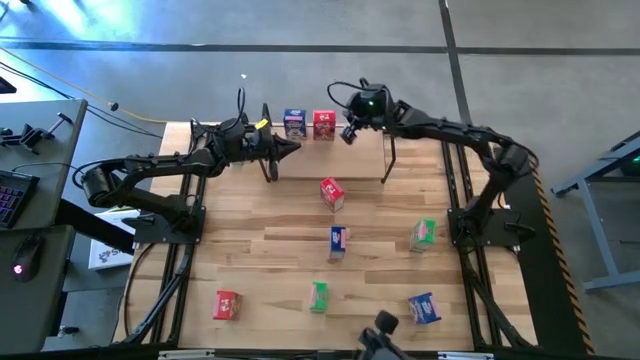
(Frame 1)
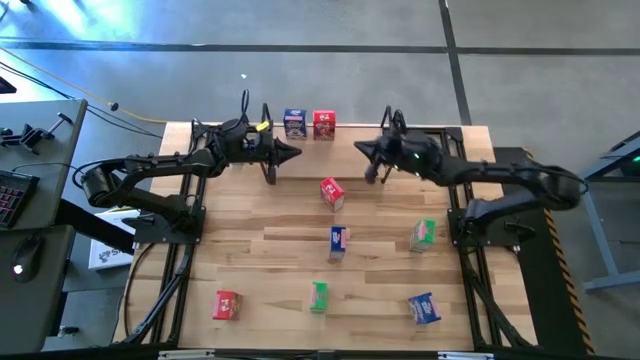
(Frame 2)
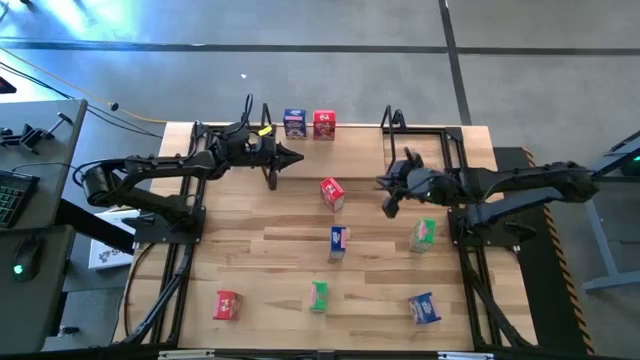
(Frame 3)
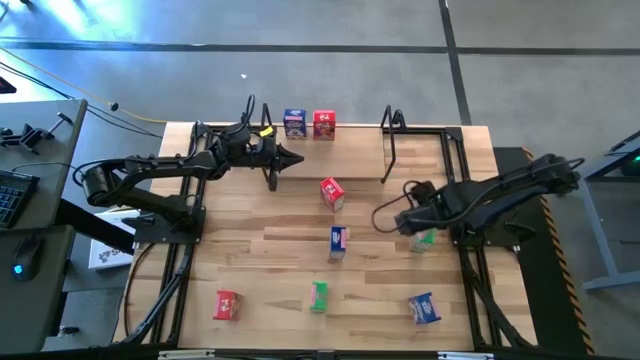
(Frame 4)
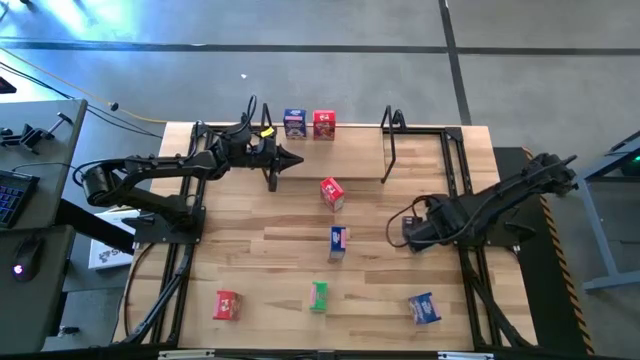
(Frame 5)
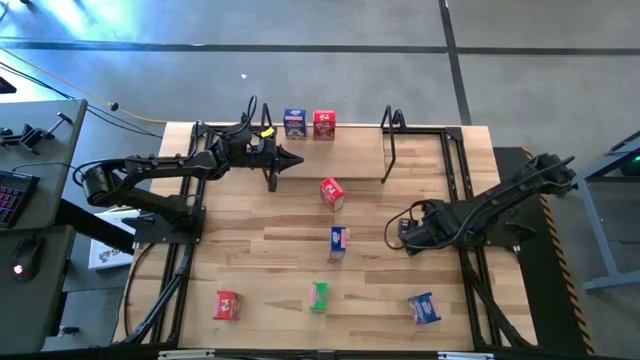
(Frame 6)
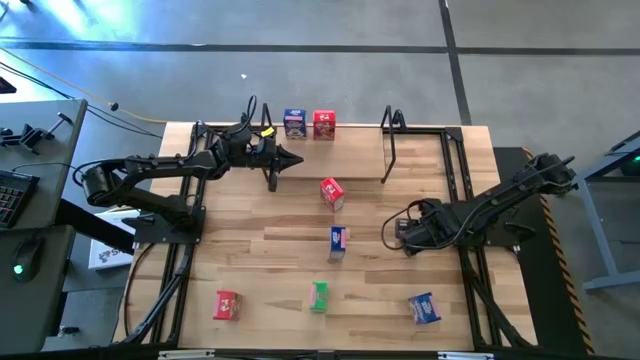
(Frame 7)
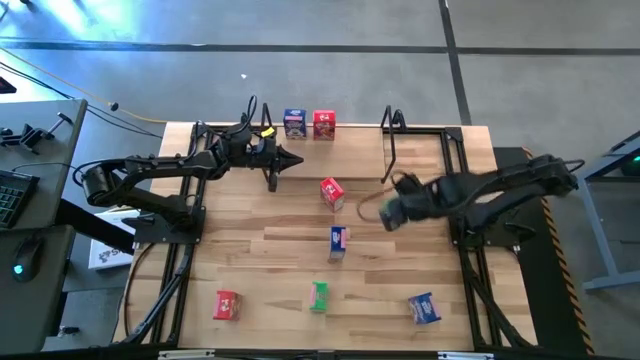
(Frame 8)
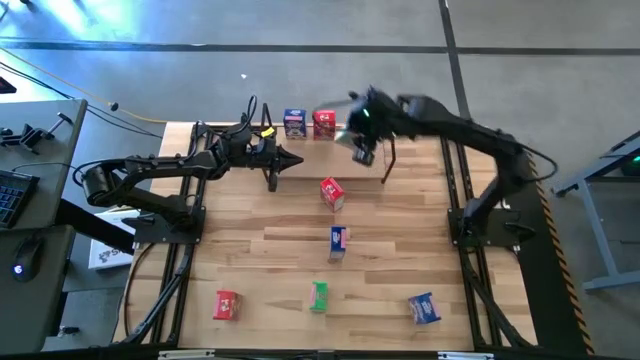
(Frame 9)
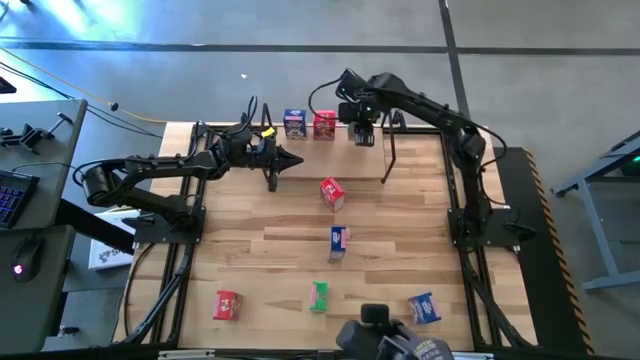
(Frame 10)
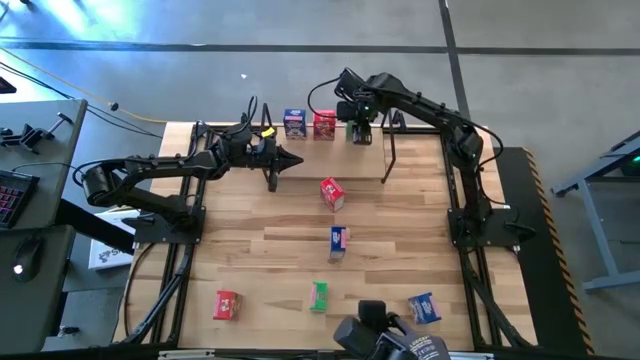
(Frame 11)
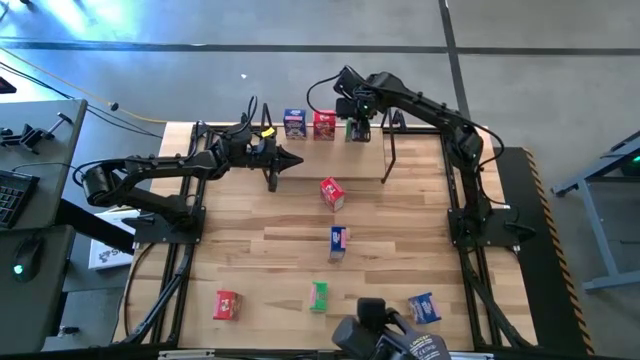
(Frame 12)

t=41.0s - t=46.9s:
Task: Stack cereal on shelf
Put the right green cereal box on the shelf

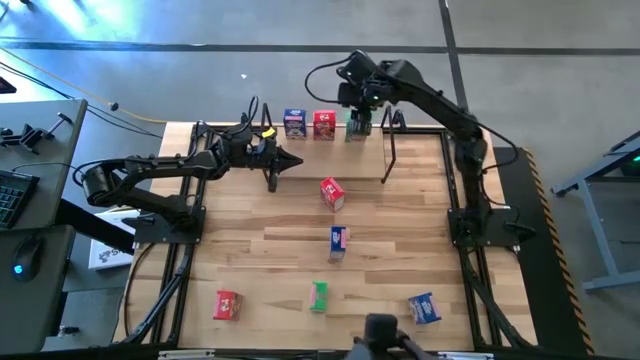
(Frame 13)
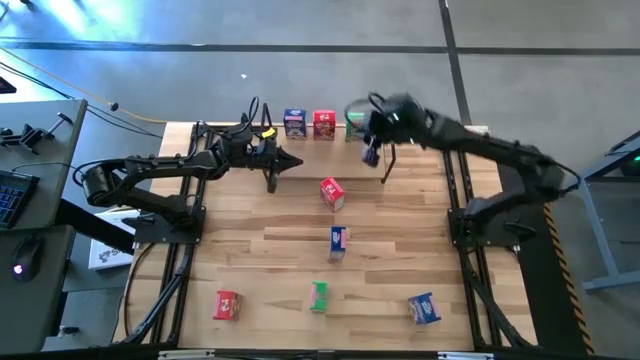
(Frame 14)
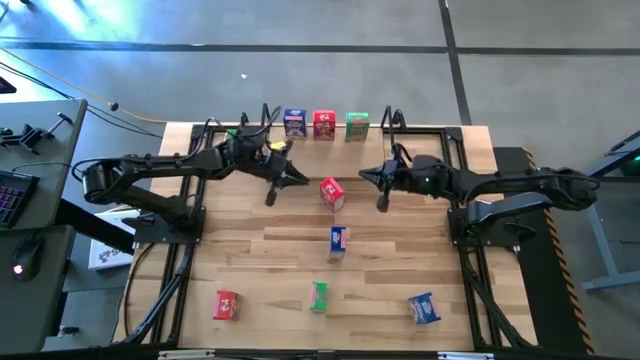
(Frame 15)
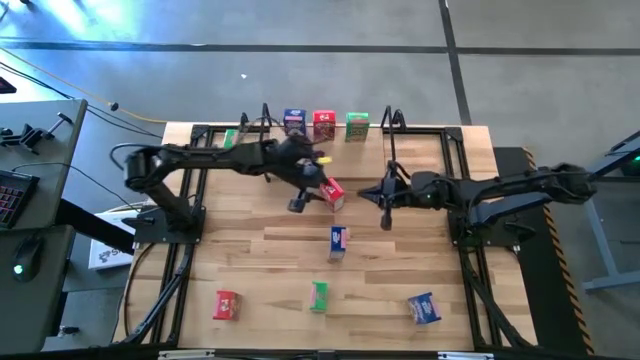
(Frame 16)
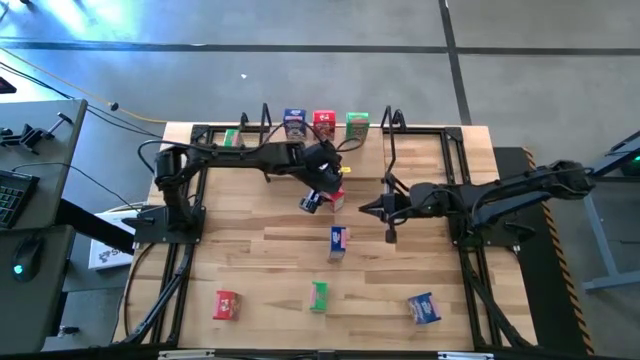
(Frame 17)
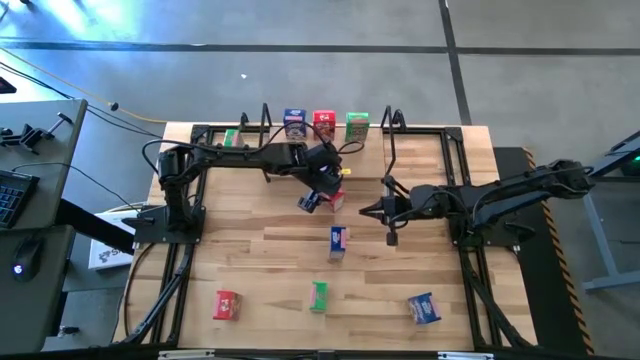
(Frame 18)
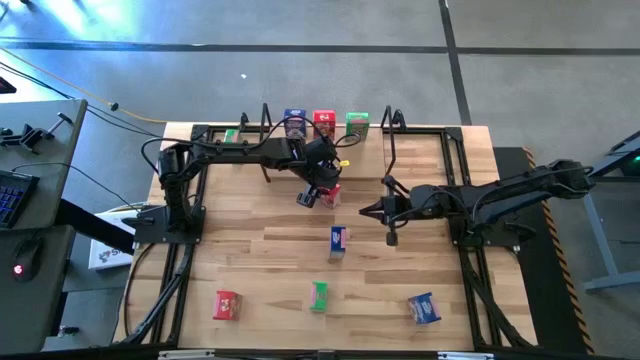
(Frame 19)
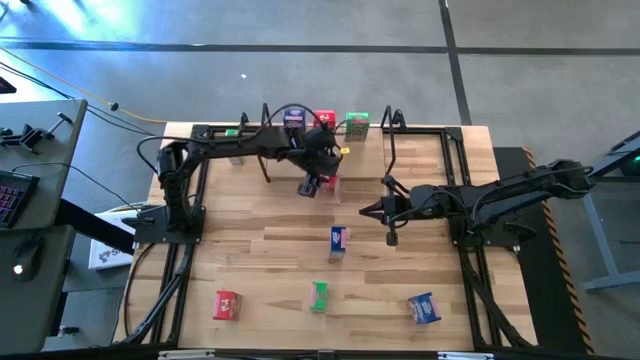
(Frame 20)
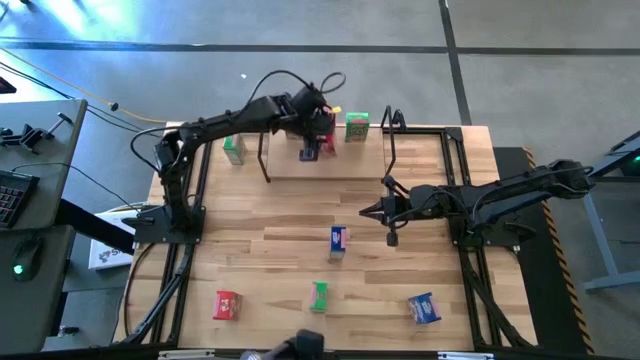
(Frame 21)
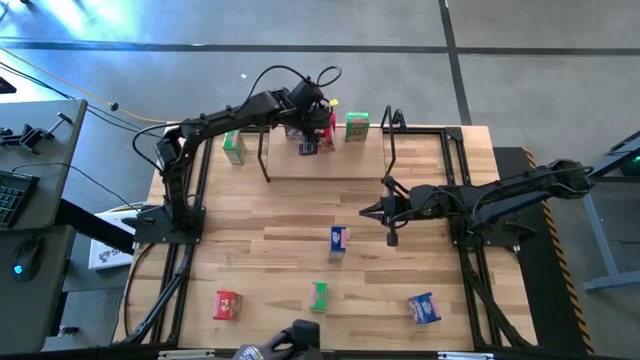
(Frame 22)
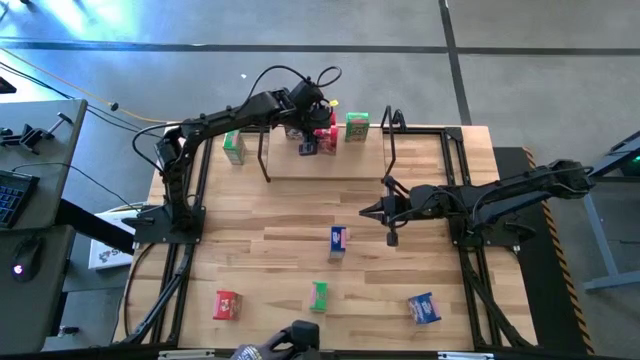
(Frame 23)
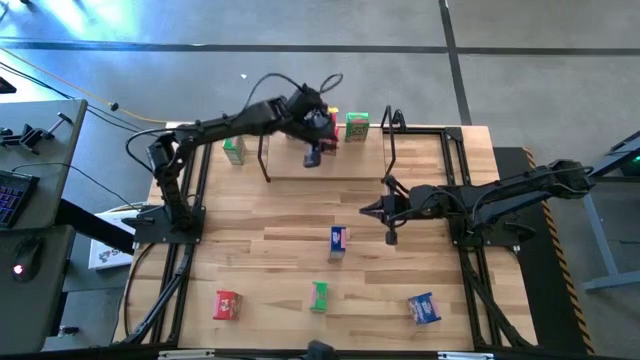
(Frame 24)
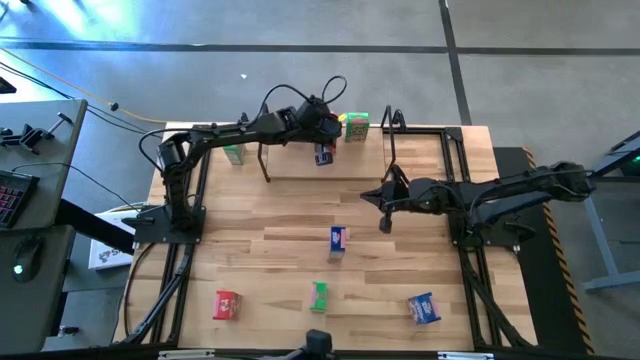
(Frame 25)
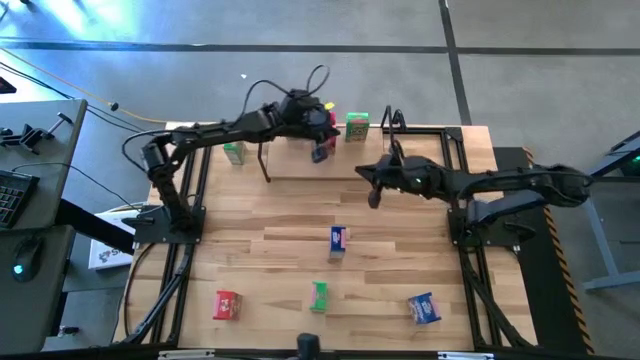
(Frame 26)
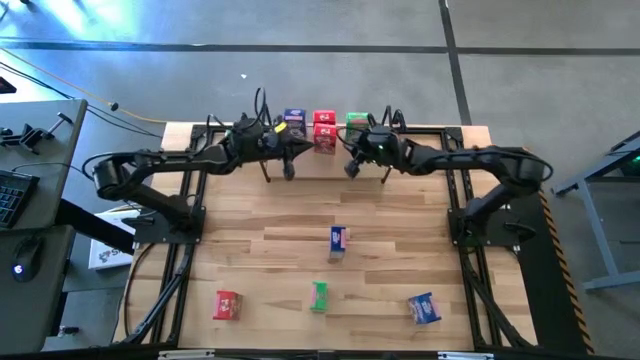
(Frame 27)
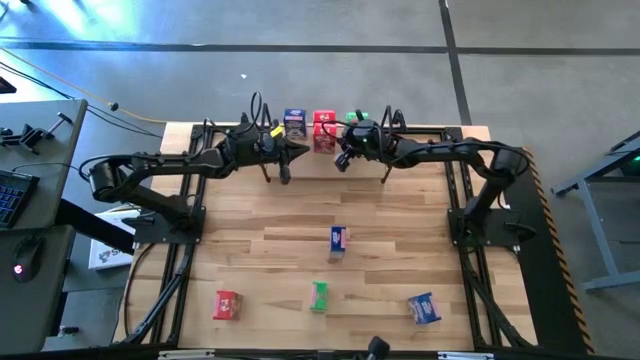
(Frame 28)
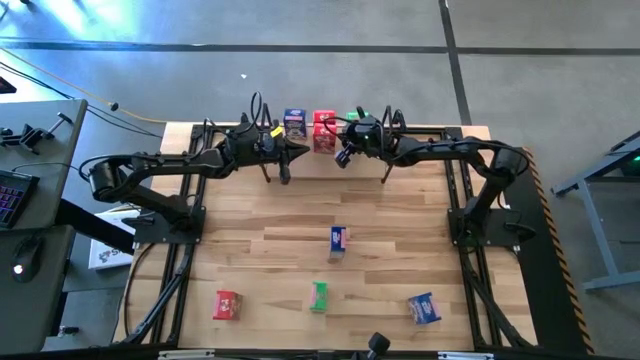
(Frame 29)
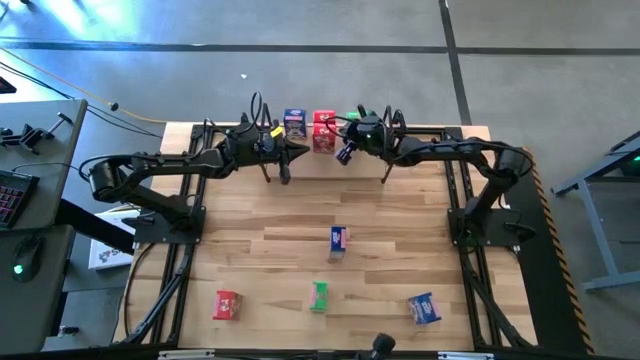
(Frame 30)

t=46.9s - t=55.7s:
Put the top red cereal box on the shelf aligned with the other red cereal box

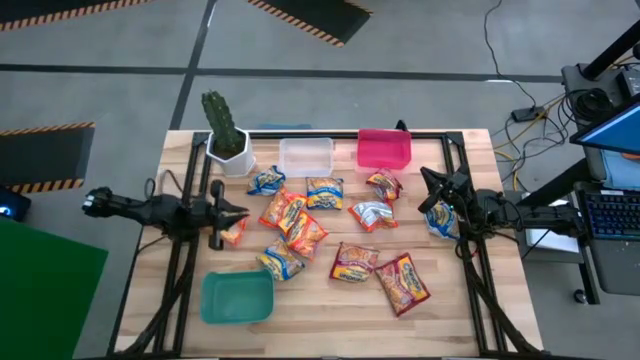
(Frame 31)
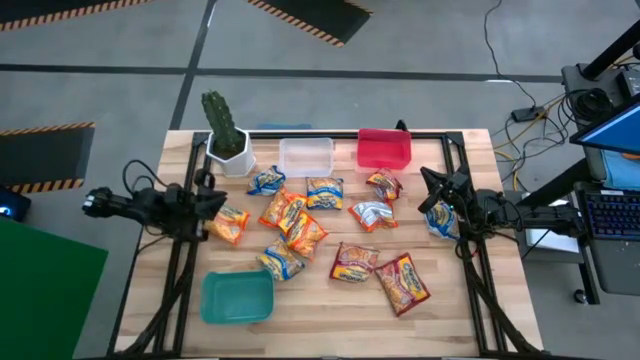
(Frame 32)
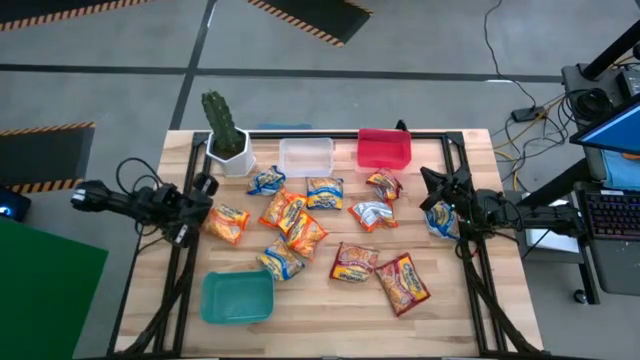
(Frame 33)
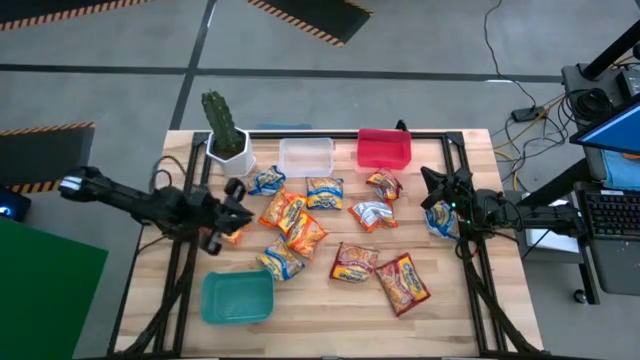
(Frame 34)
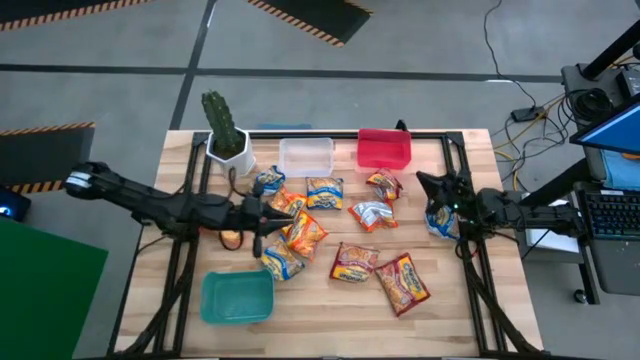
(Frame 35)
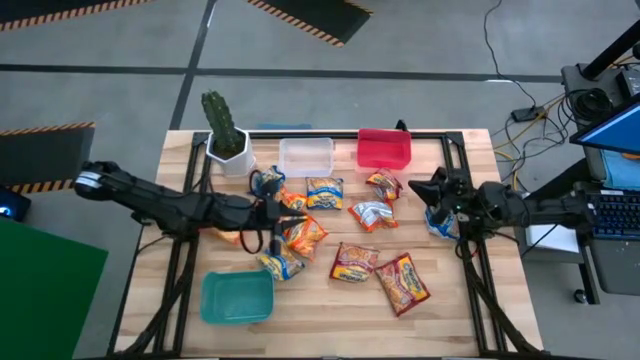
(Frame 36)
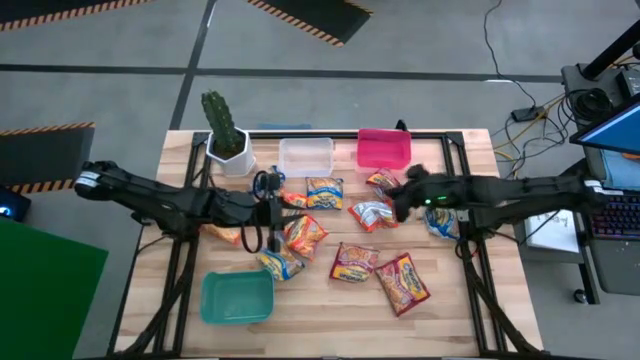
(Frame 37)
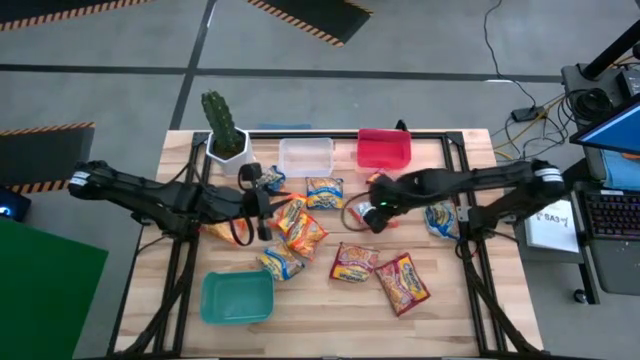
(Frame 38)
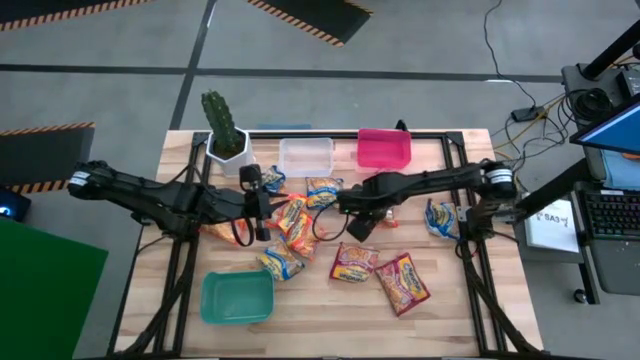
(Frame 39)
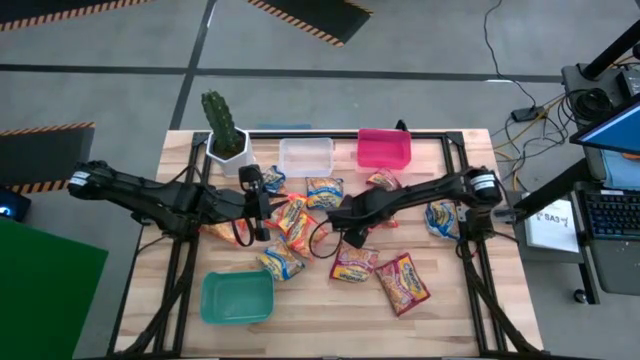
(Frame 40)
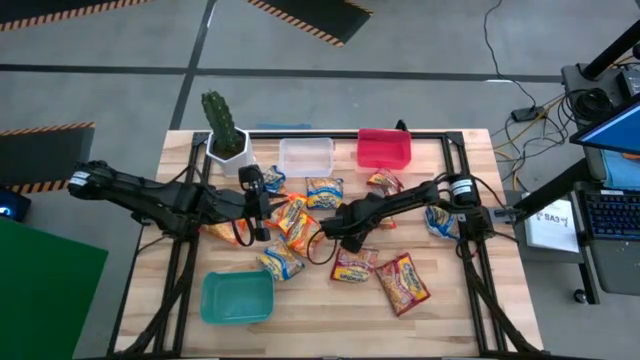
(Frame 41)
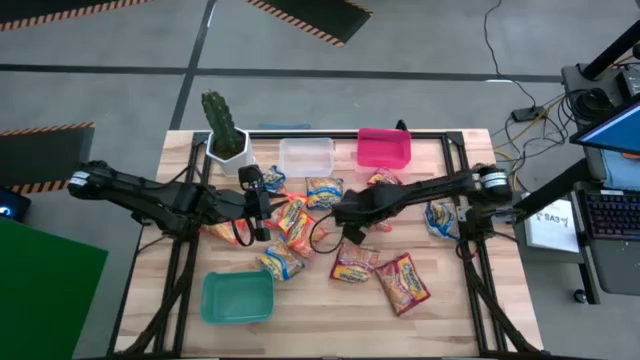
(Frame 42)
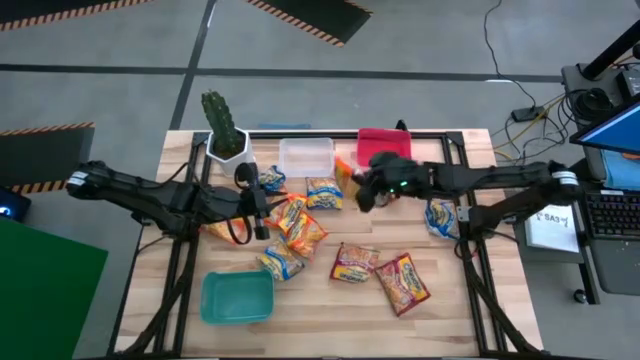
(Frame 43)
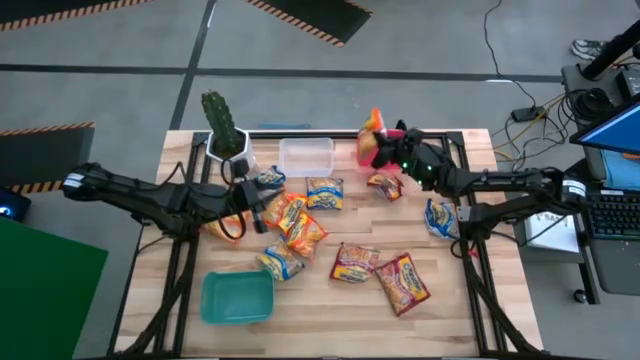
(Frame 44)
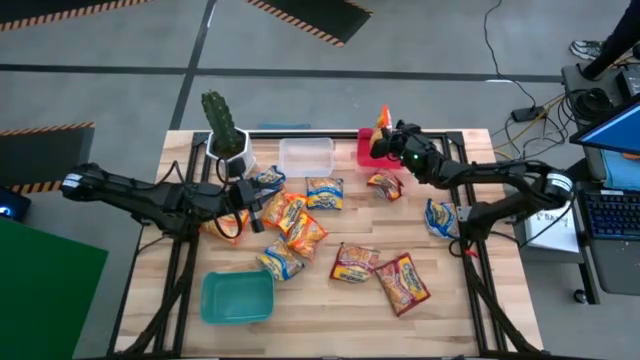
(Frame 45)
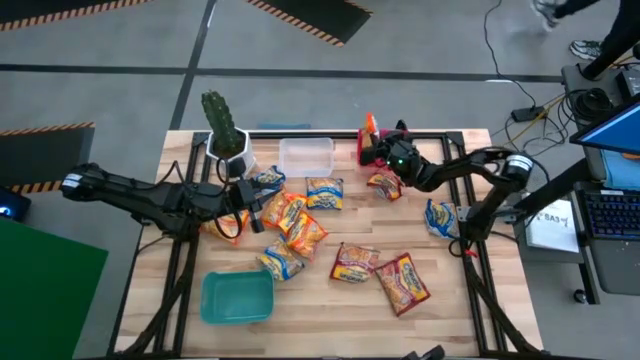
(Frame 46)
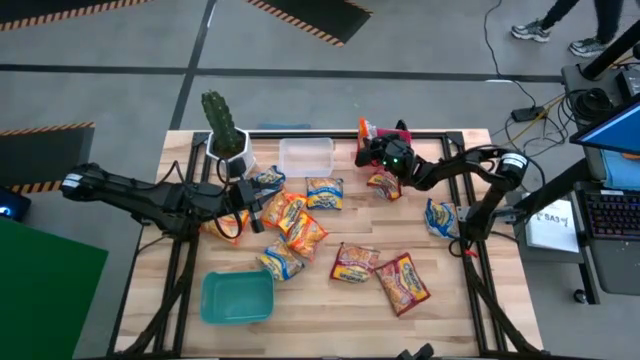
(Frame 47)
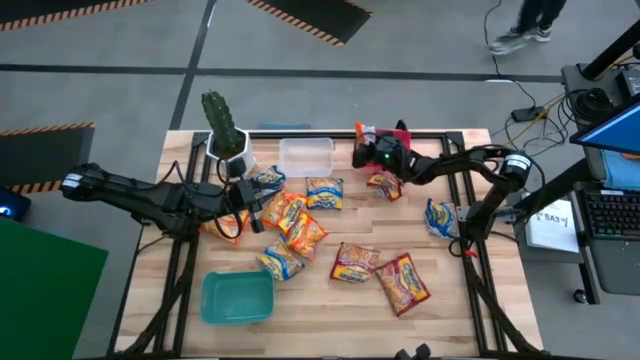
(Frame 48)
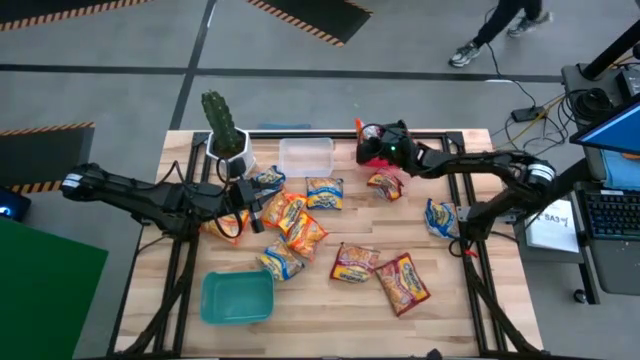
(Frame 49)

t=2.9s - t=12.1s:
Task: Sort Maruchan noodles
Put the orange noodle pack into the red bin
